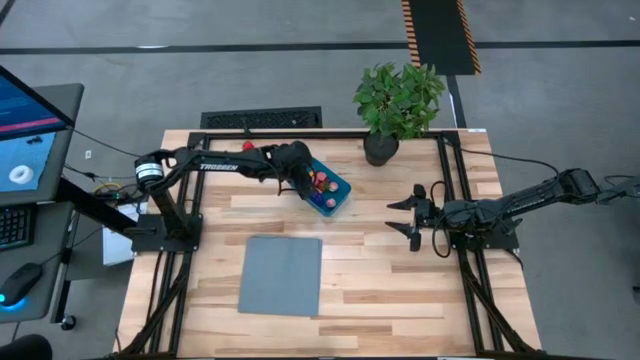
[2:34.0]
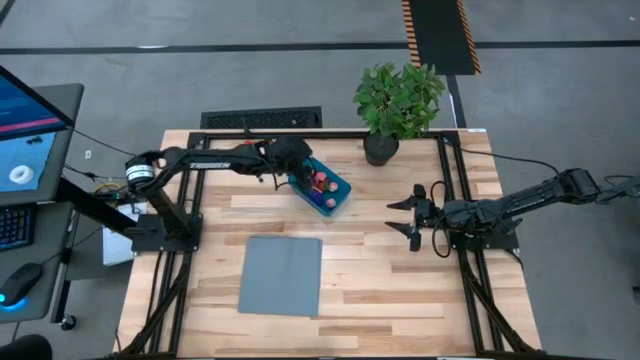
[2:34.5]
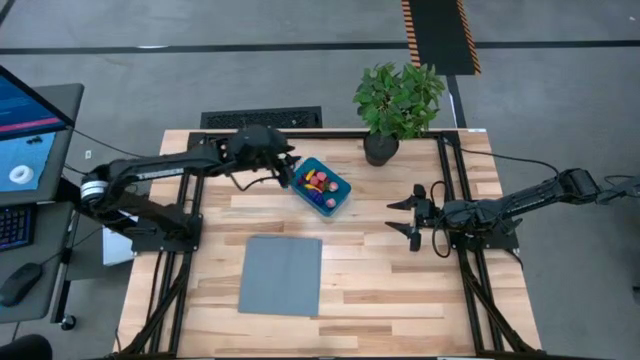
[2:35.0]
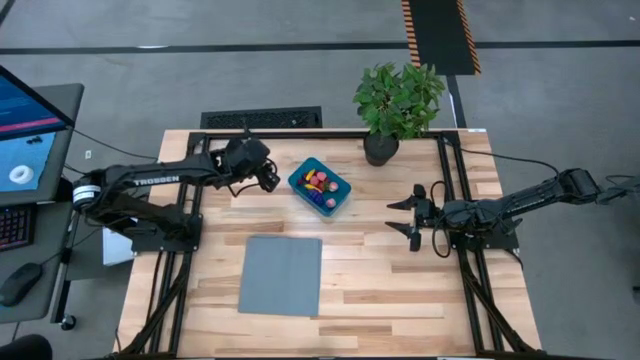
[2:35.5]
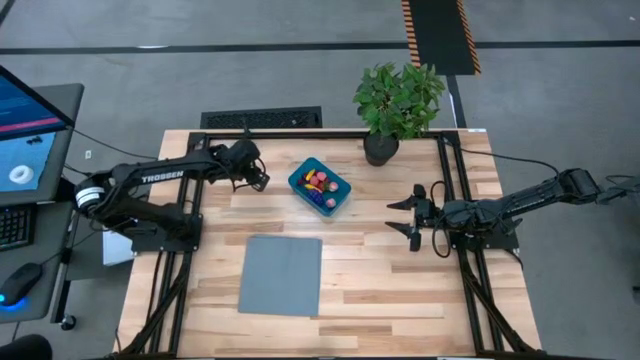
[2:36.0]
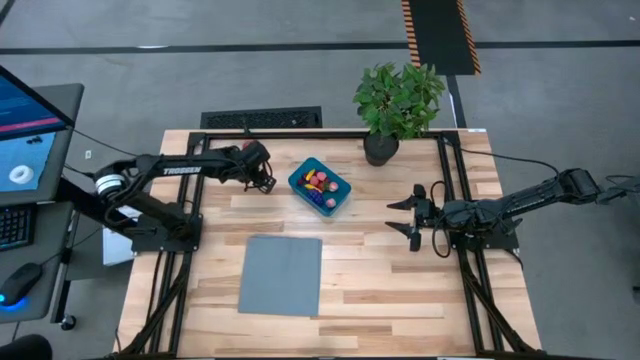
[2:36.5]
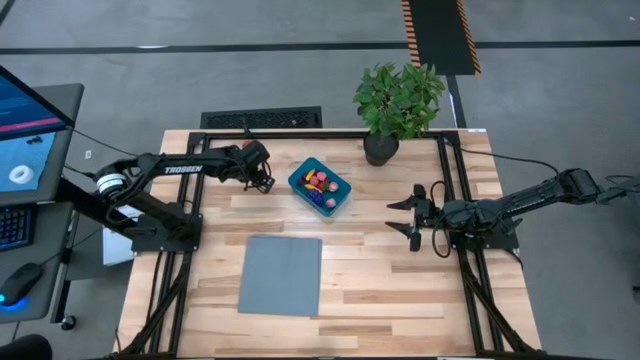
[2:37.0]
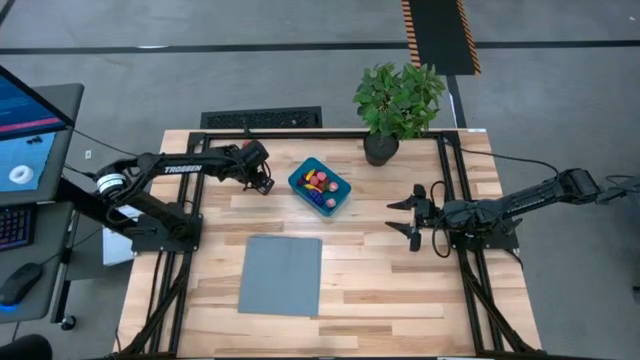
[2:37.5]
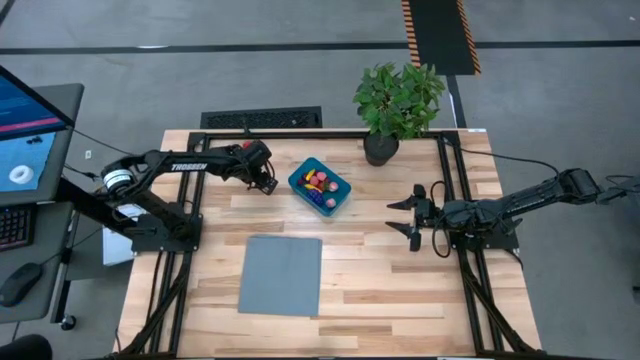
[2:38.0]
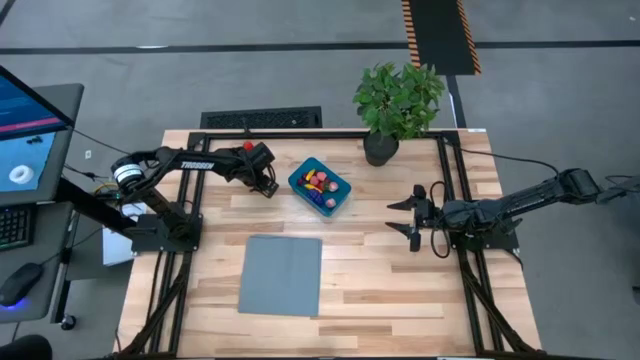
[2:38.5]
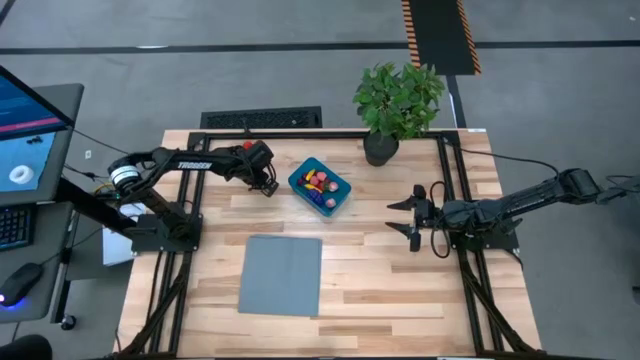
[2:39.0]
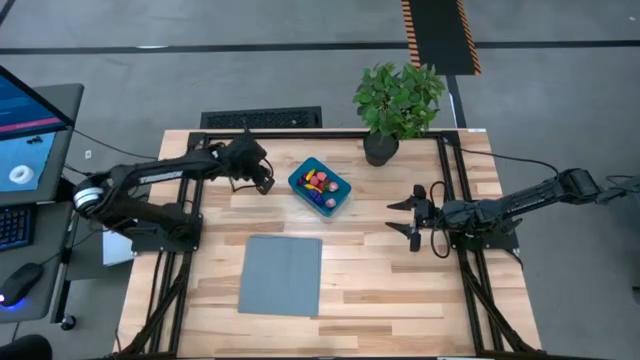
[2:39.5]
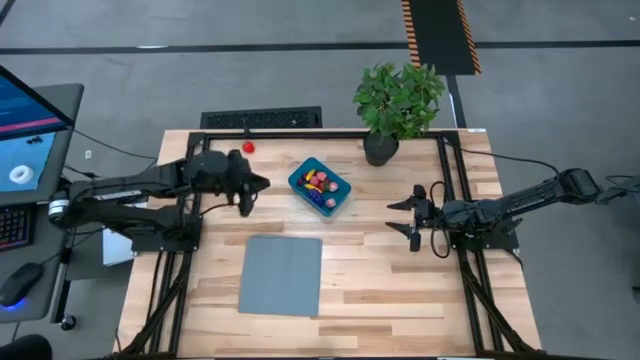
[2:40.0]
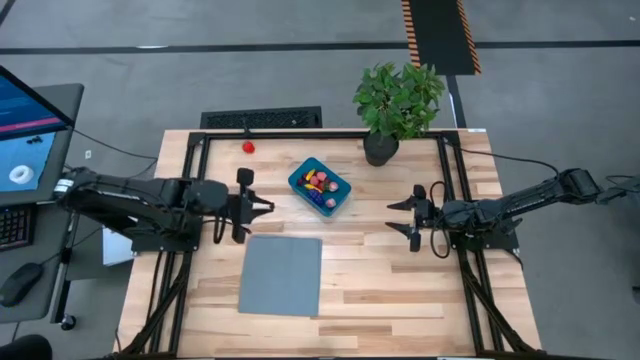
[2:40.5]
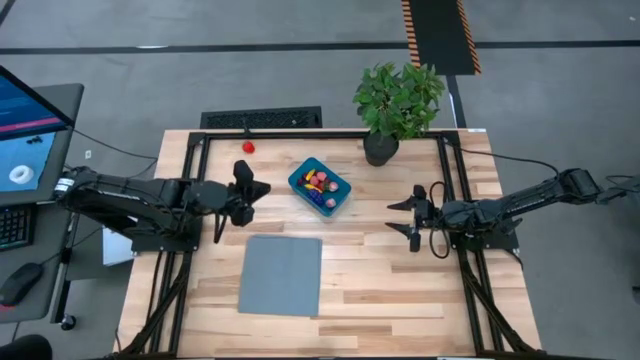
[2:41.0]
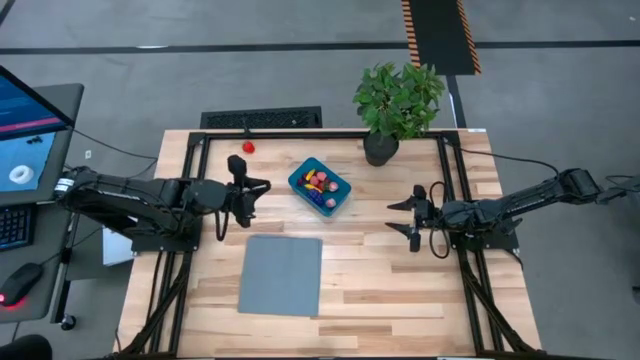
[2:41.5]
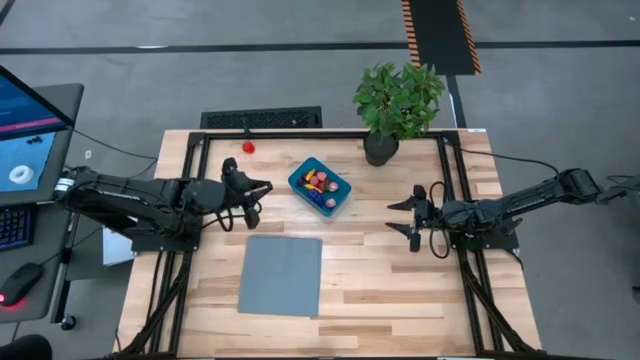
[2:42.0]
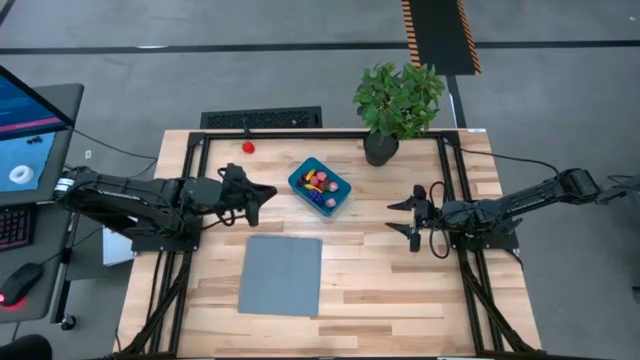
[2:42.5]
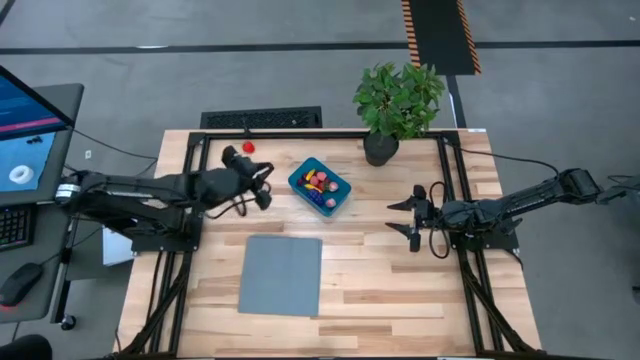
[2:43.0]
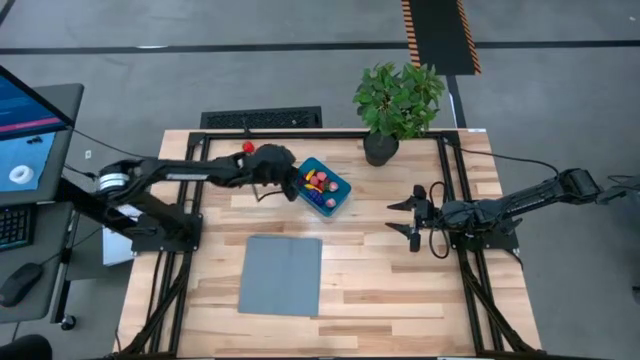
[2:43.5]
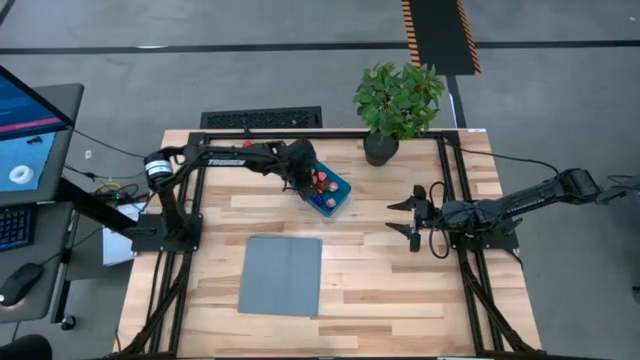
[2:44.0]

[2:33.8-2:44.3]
Task: Pick and placing Produce into tupperware
Put the blueberry into the container

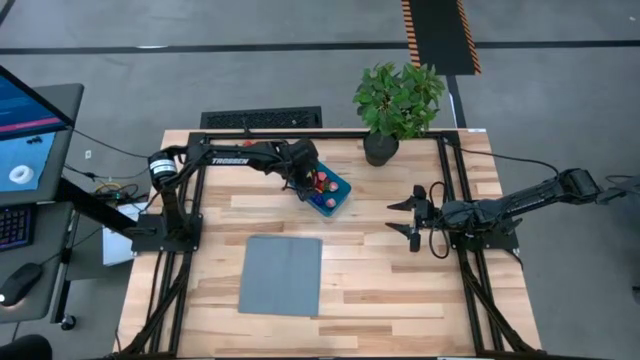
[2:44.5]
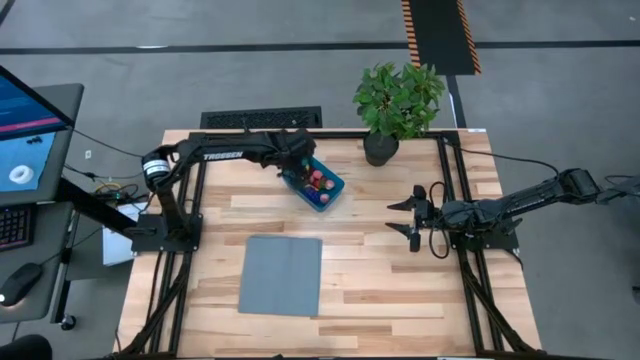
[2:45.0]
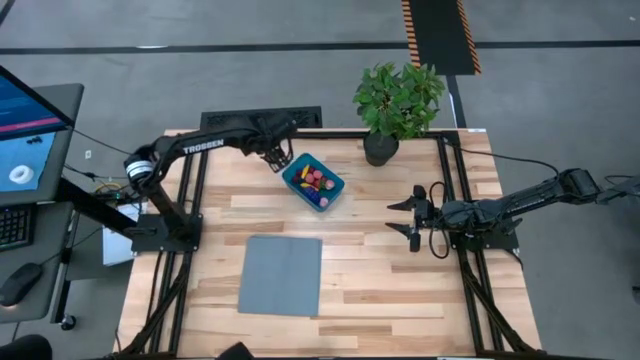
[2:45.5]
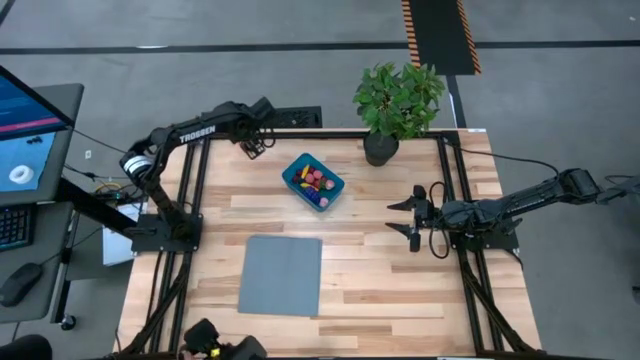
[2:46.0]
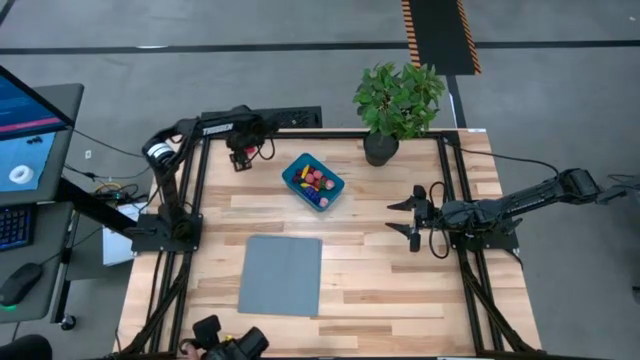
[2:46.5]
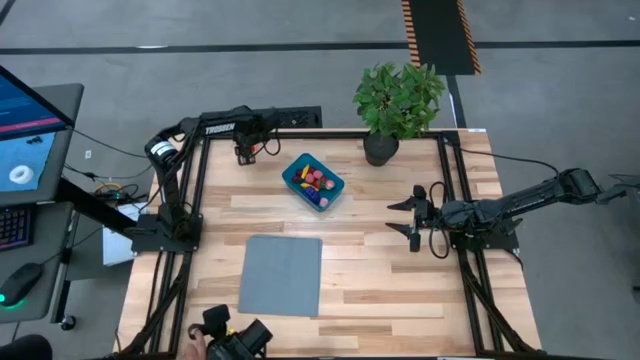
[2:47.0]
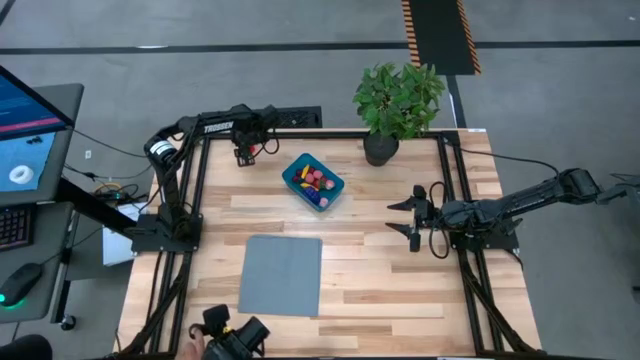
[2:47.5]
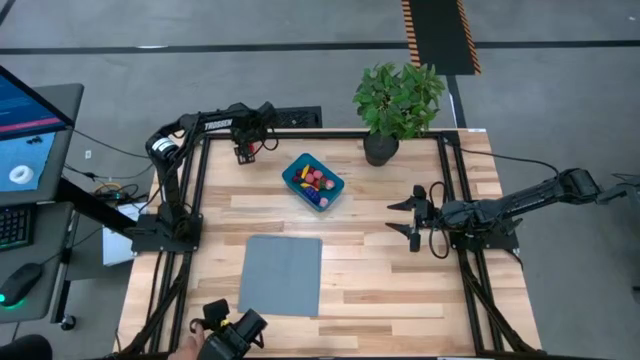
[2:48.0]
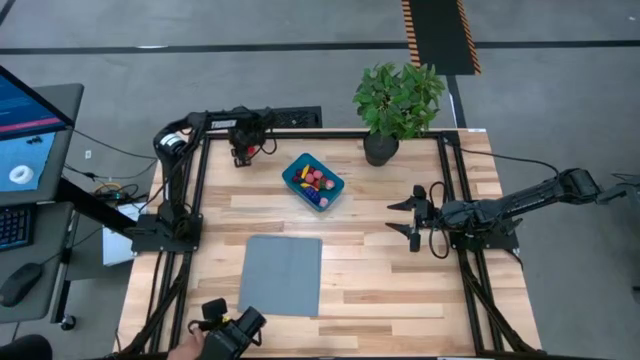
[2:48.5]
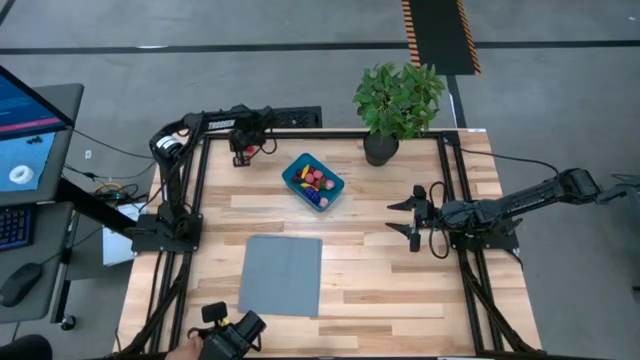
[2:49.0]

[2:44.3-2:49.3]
Put the strawberry into the container

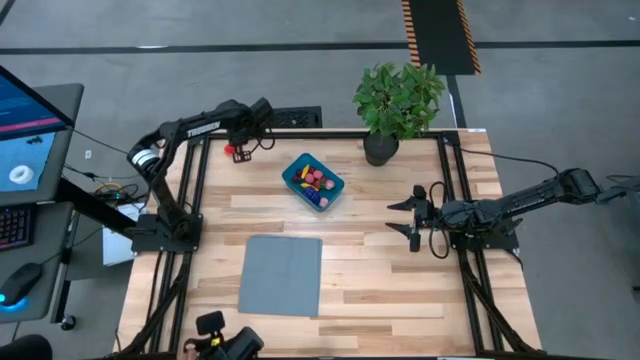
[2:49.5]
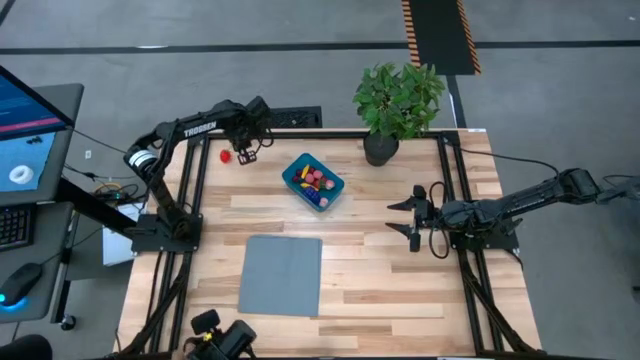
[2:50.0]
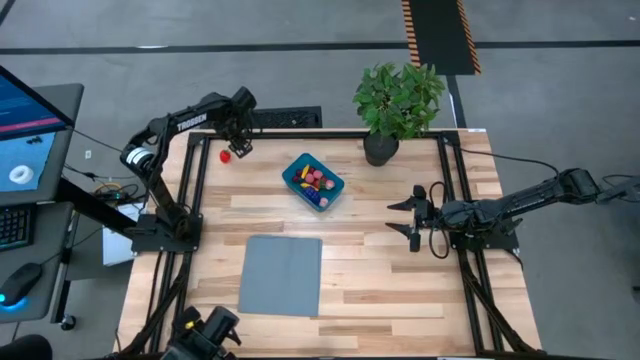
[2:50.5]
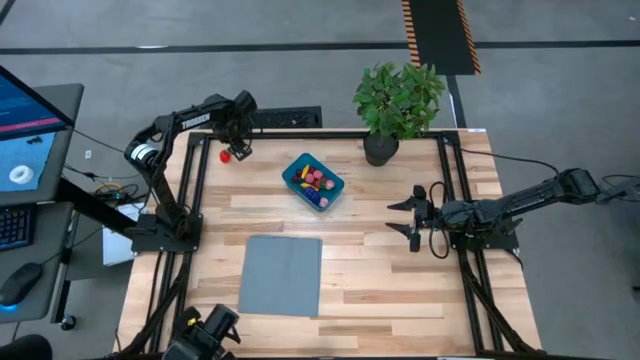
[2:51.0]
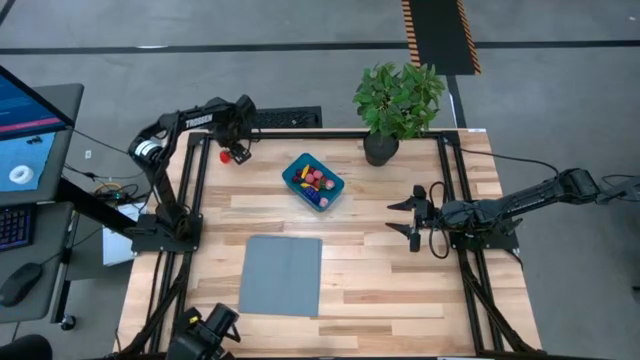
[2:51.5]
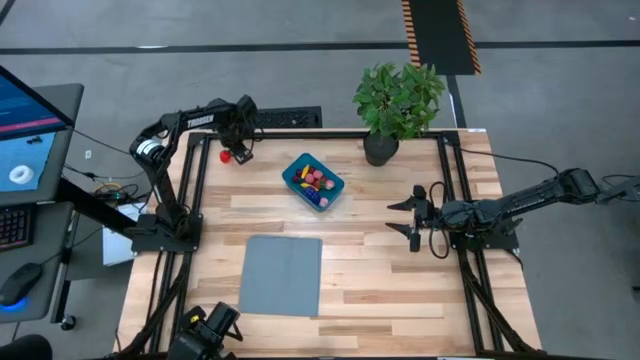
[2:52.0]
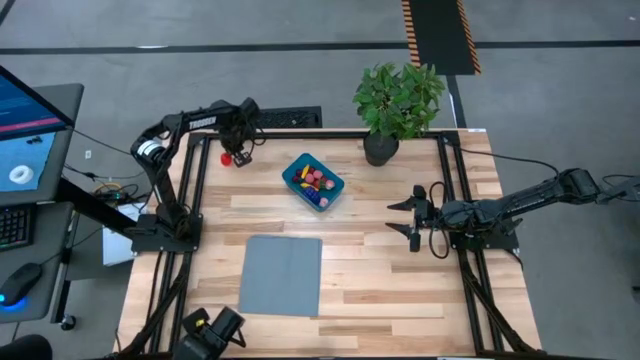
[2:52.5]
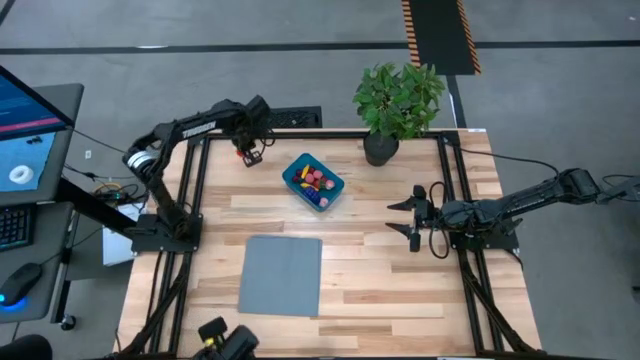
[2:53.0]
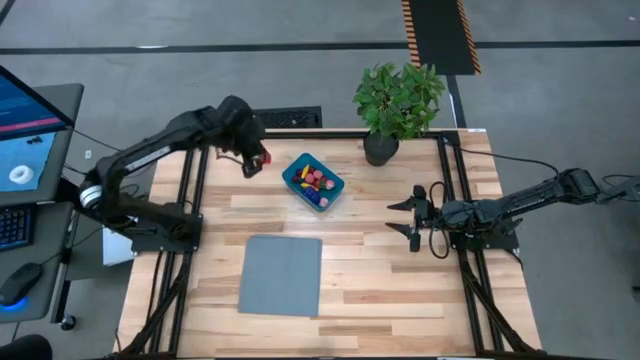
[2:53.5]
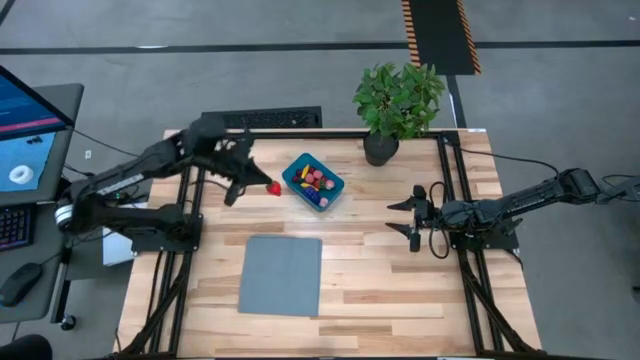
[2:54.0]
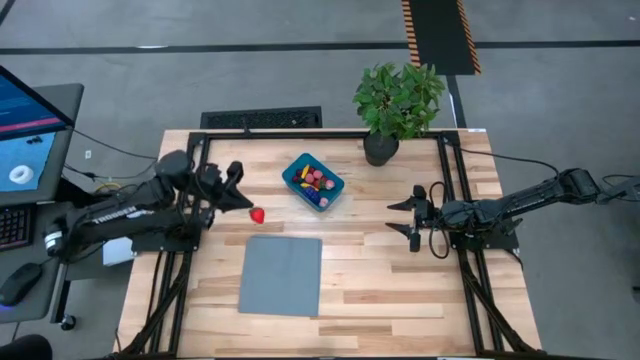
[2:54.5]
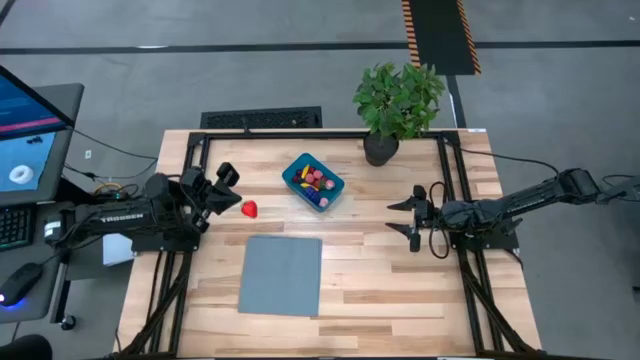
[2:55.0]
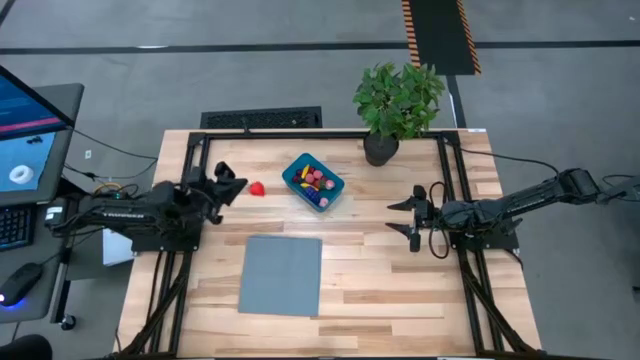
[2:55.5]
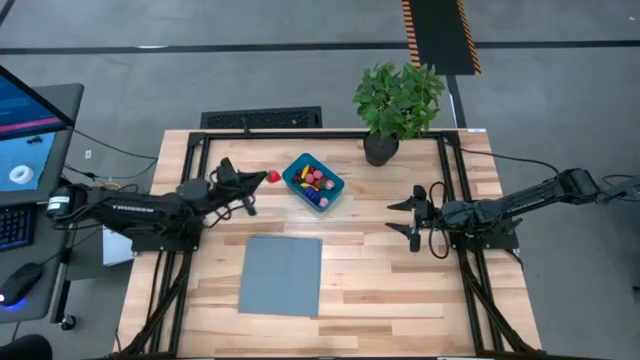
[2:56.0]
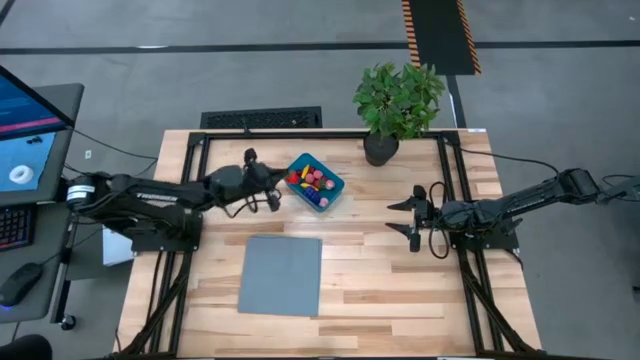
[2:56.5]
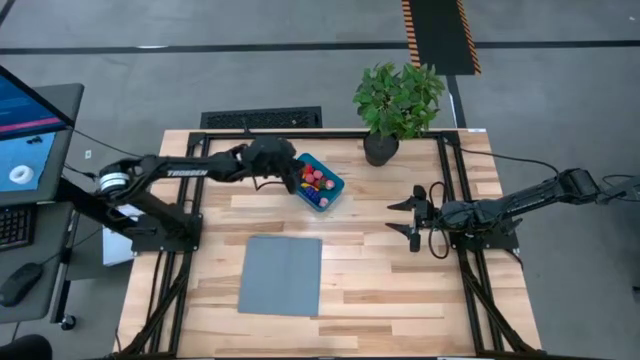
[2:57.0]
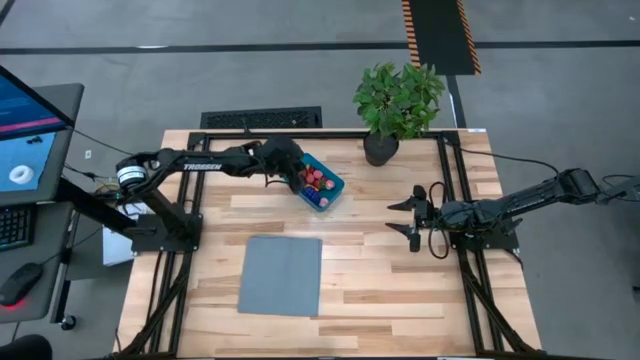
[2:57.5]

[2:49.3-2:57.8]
Put the strawberry into the container
